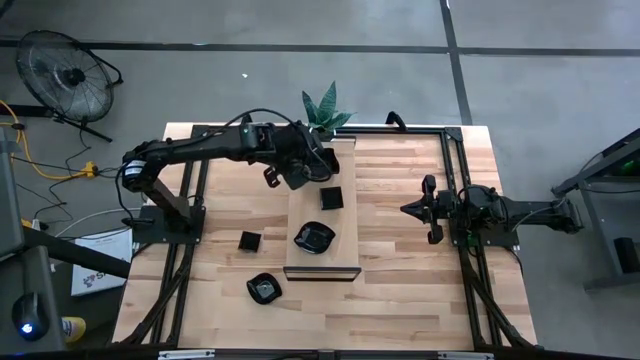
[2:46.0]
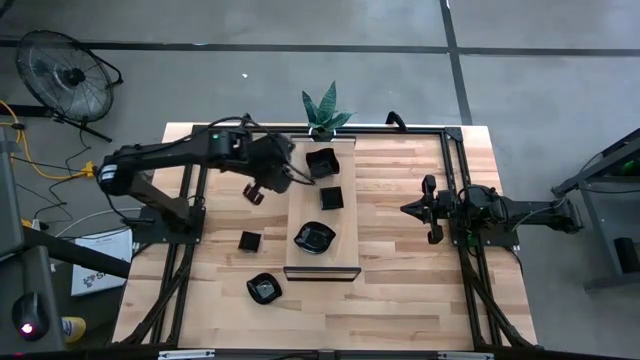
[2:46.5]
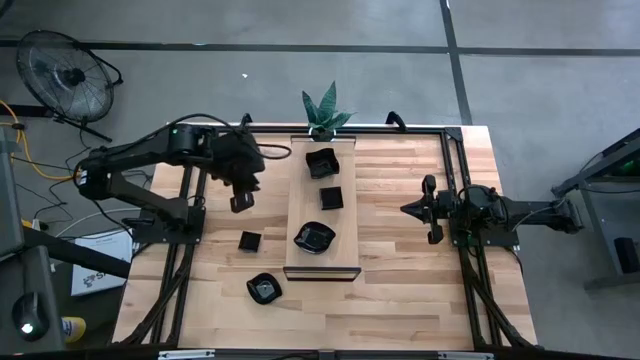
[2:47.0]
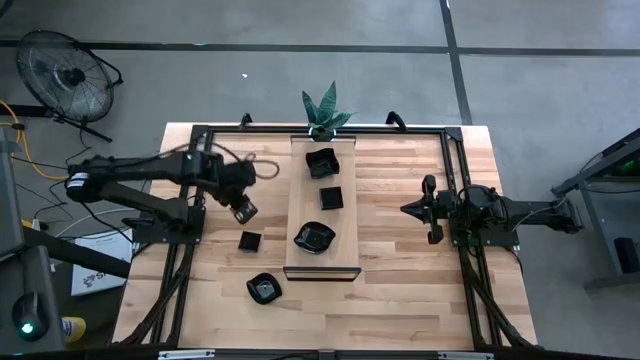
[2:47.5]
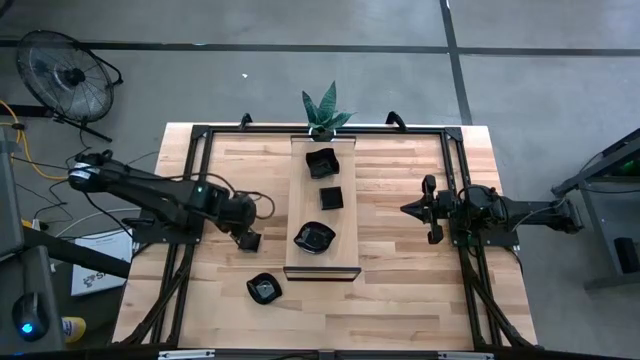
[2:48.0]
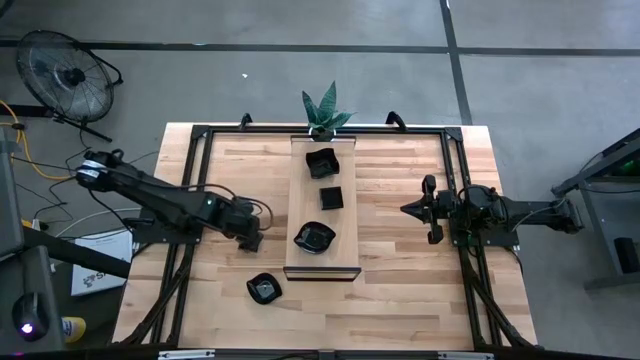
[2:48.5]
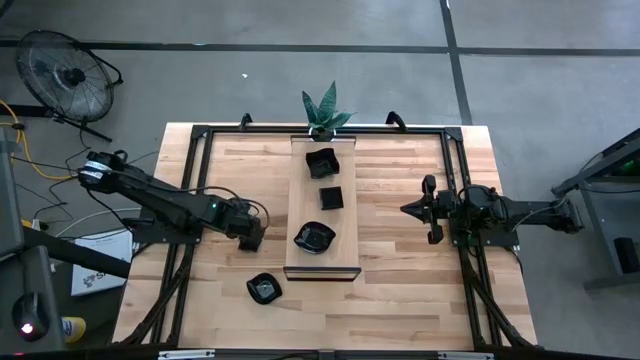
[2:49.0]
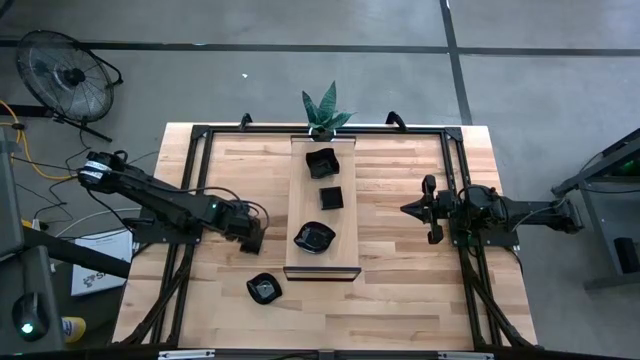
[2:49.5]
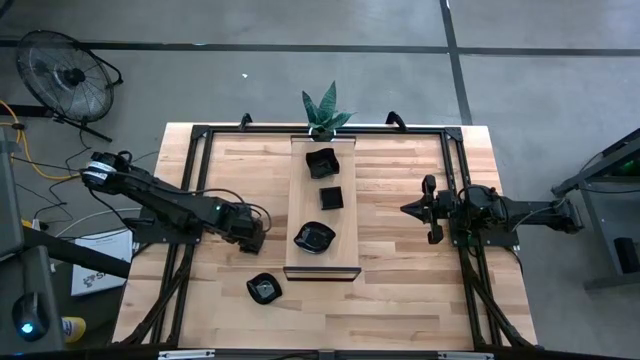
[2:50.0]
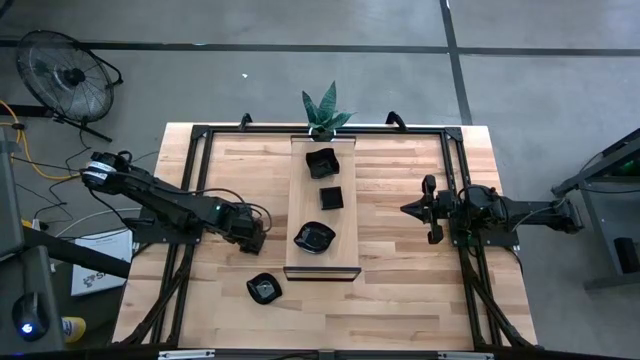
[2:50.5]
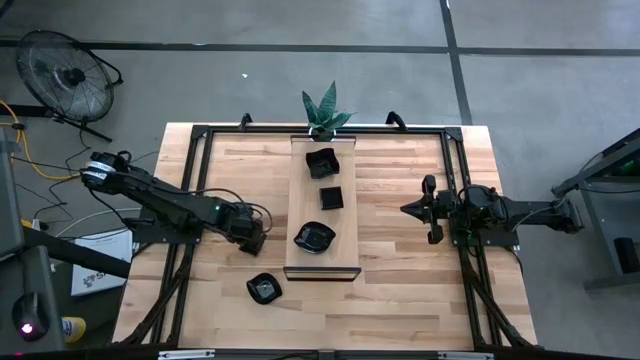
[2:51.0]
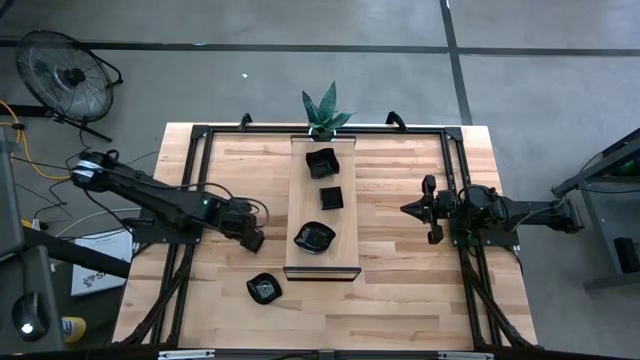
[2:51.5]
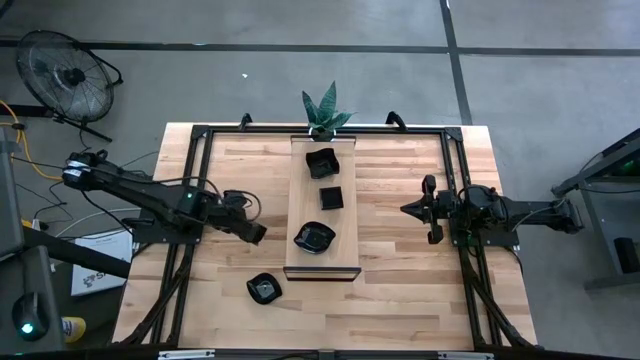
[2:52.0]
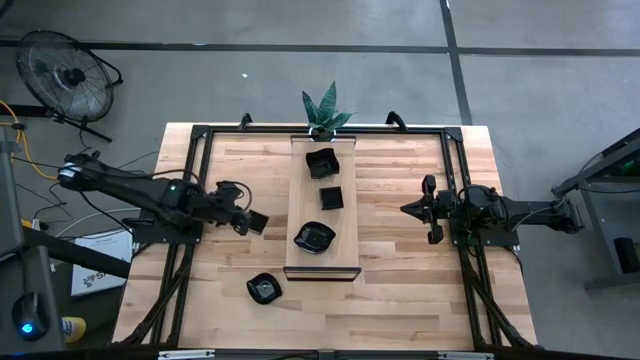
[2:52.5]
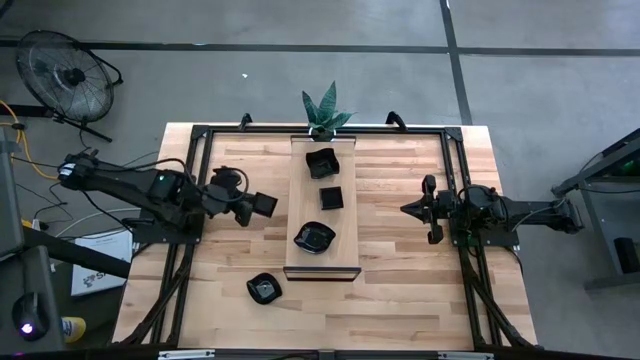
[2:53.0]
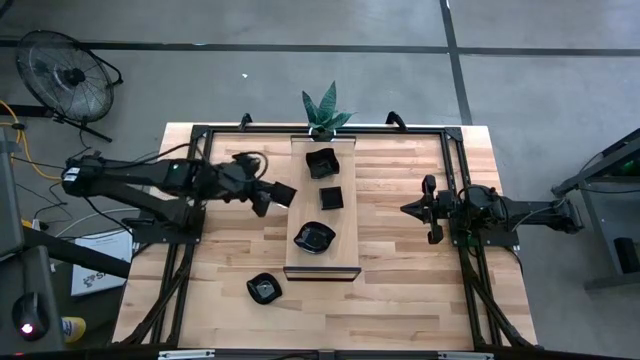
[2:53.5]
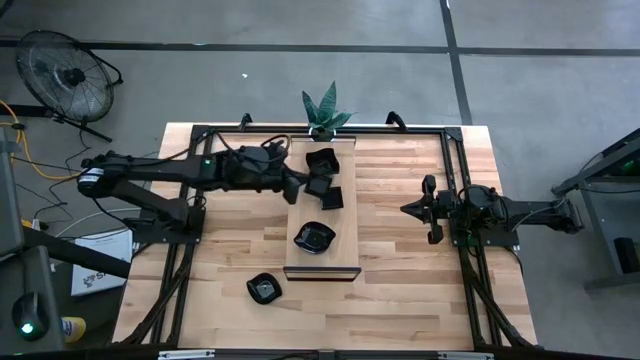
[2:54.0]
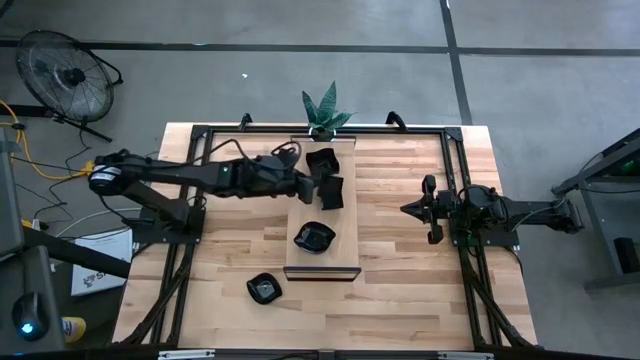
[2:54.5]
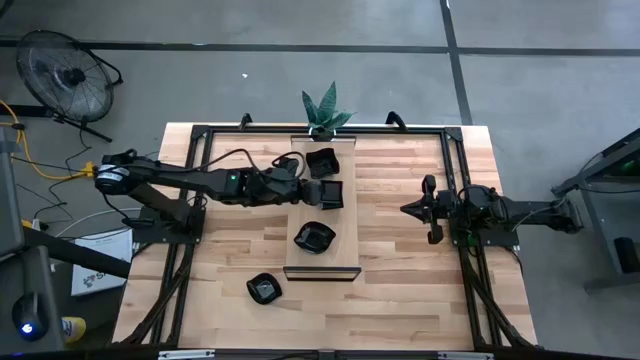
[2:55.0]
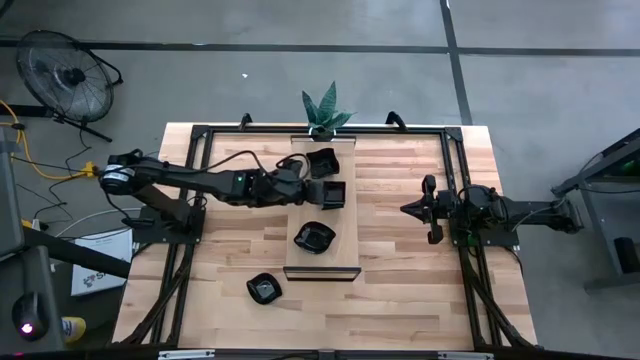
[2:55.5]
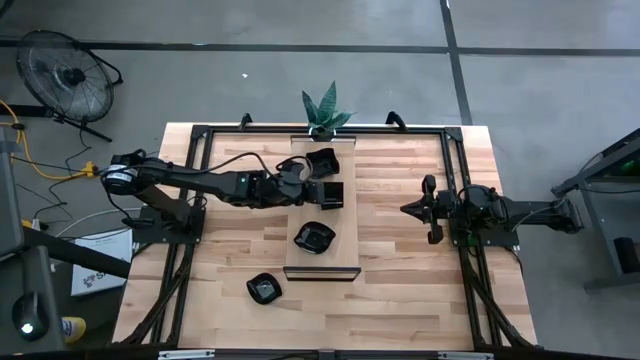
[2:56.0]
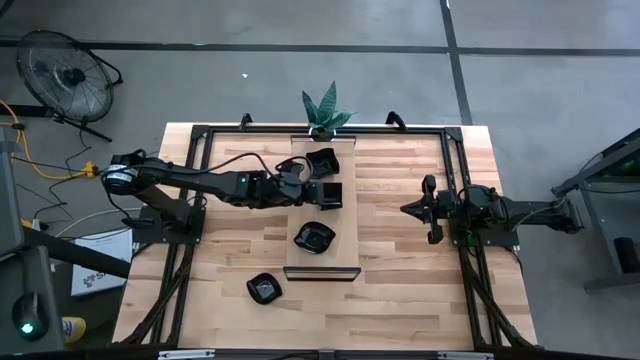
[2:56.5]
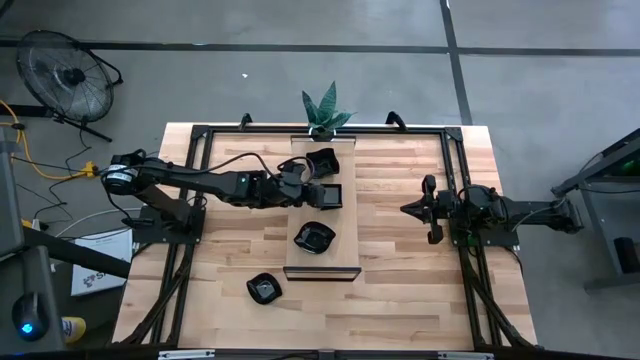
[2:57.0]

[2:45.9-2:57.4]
Task: Pick & Place Mini shaped plates
Stack the black square plate on top of the black square plate on the shelf

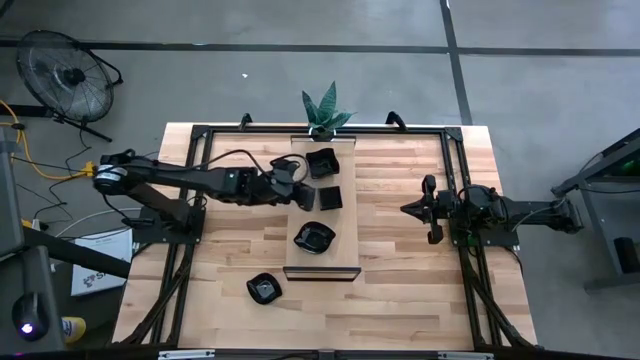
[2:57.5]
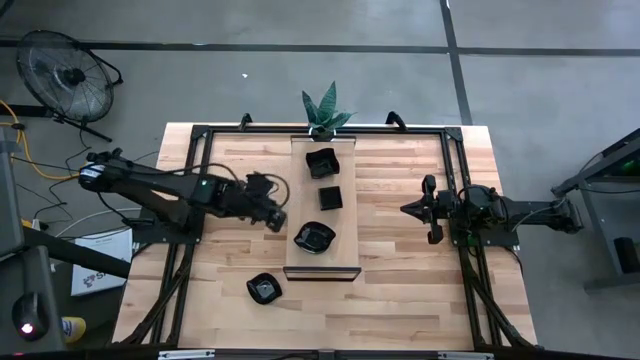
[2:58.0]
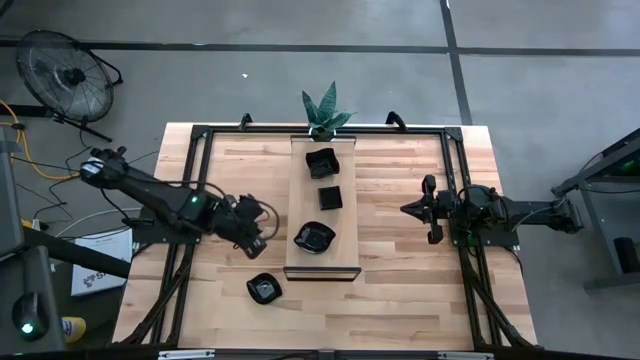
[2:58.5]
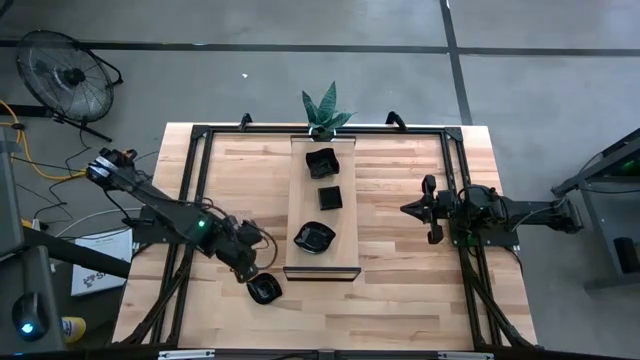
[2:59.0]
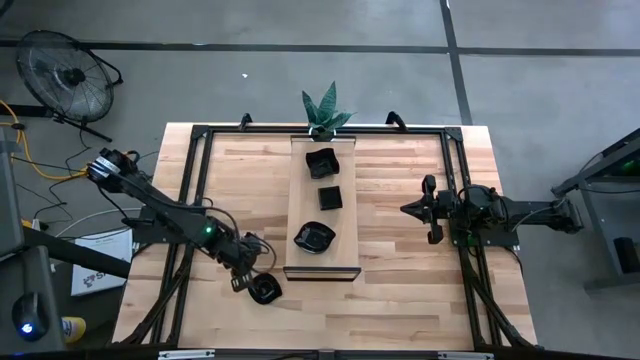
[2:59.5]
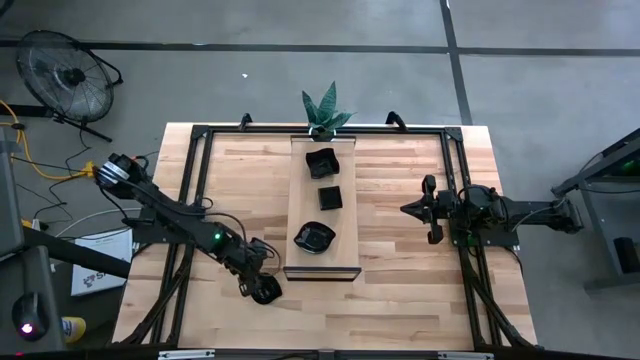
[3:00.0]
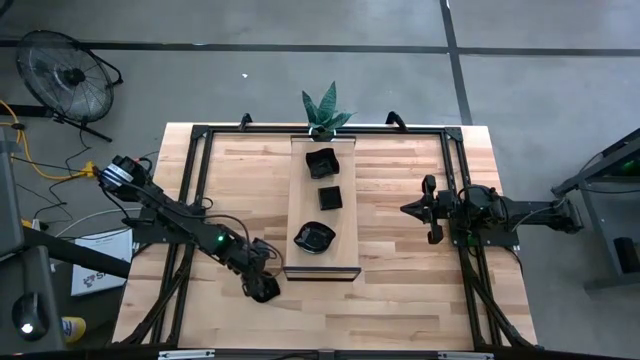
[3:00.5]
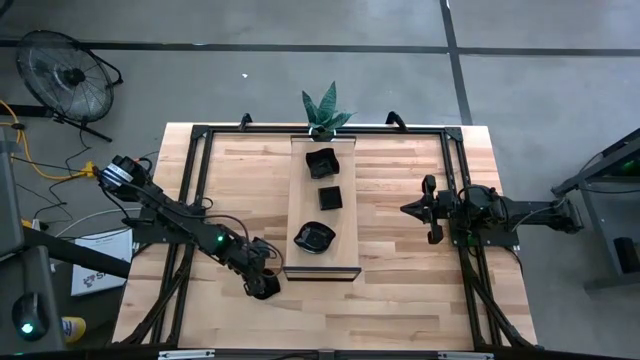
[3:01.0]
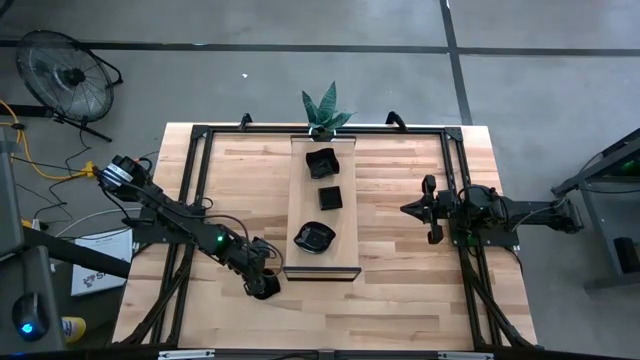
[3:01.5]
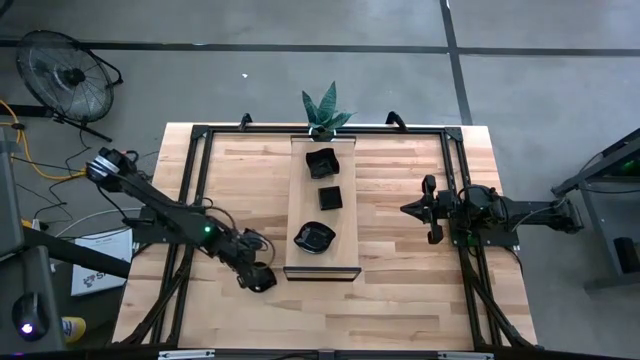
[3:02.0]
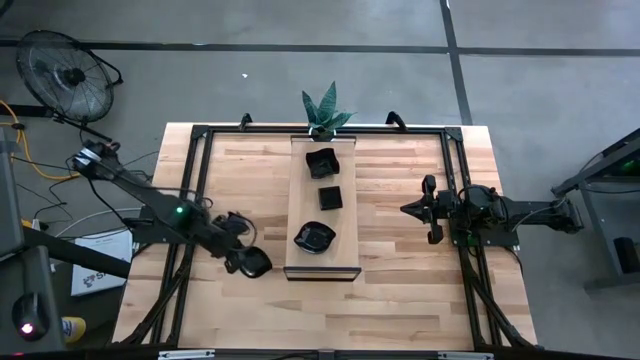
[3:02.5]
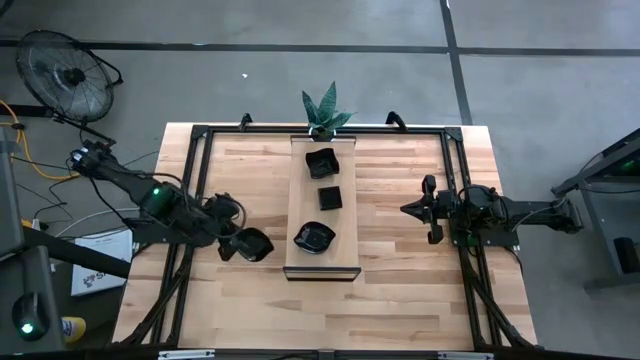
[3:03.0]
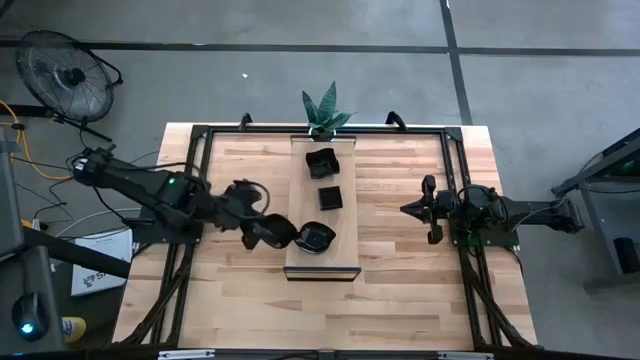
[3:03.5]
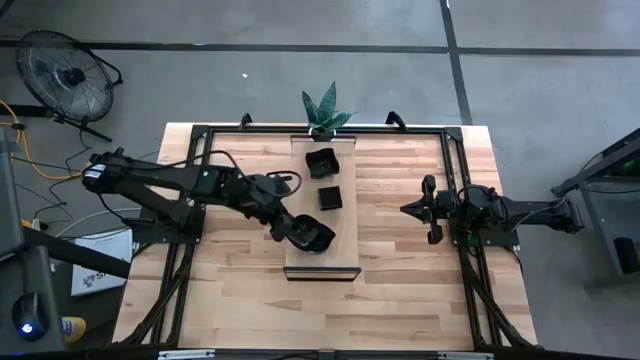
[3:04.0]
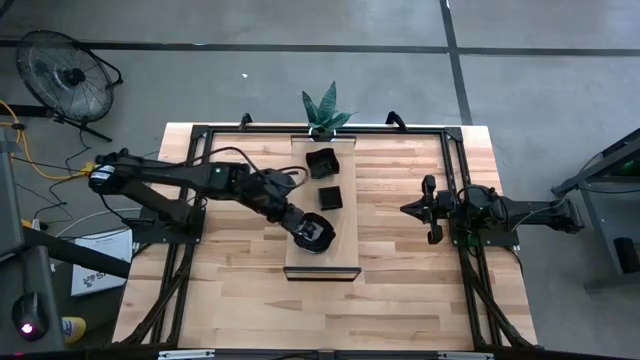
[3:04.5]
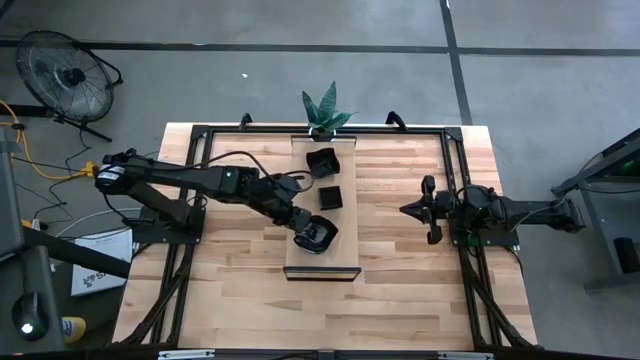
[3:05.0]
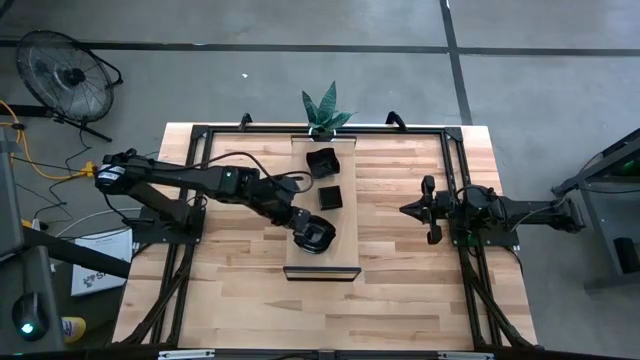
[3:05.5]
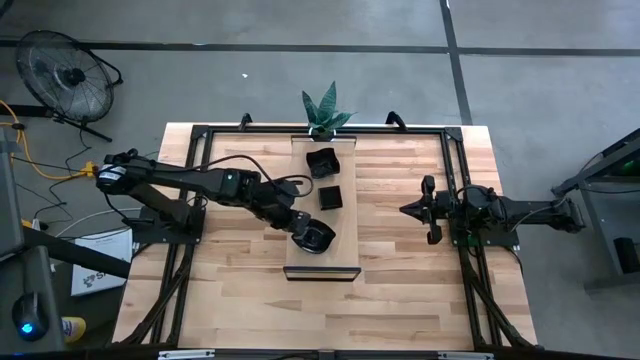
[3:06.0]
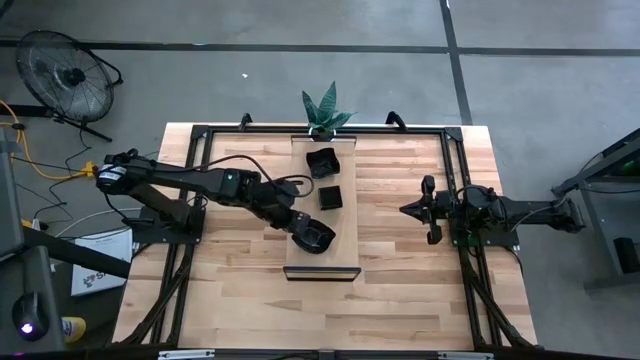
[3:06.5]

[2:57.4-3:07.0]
Stack the black leaf shaped plate on top of the black leaf shaped plate on the shelf
